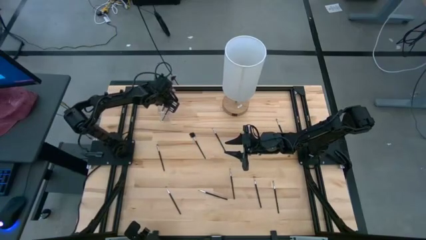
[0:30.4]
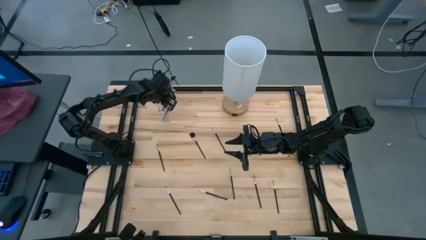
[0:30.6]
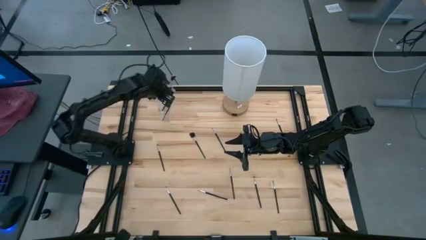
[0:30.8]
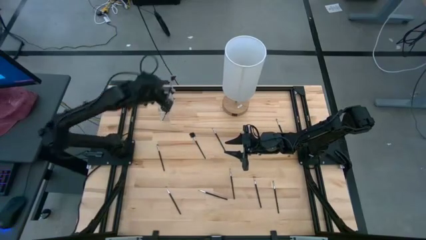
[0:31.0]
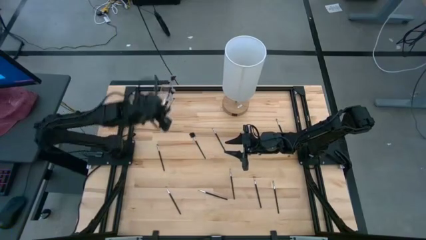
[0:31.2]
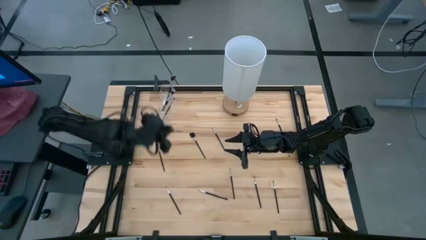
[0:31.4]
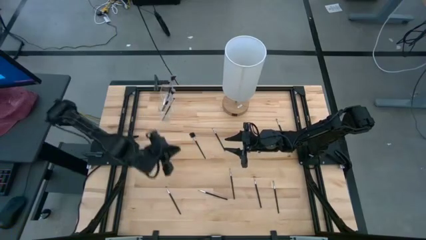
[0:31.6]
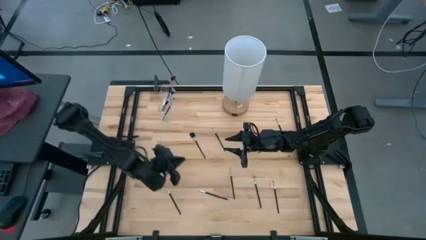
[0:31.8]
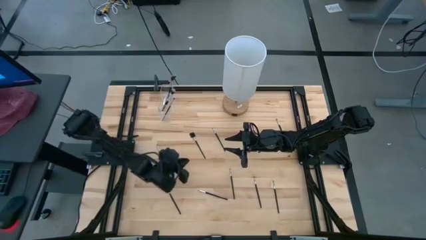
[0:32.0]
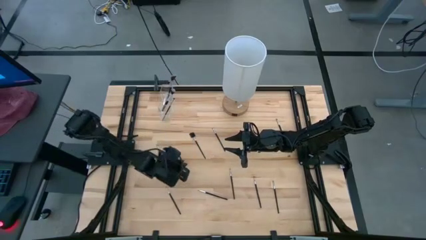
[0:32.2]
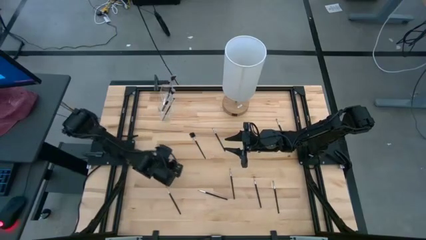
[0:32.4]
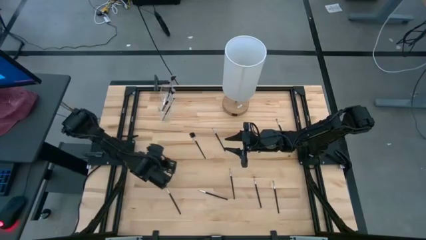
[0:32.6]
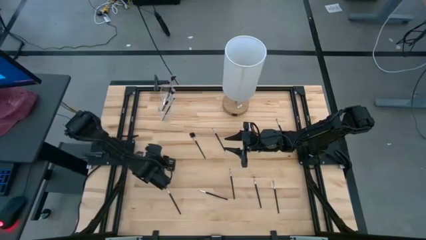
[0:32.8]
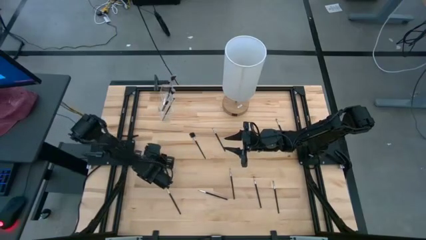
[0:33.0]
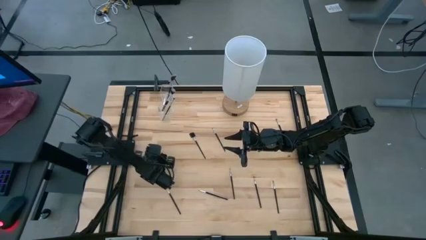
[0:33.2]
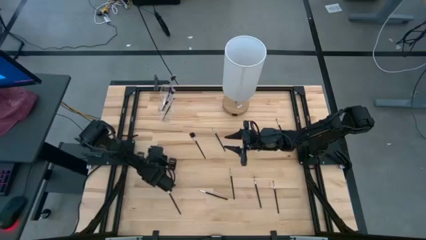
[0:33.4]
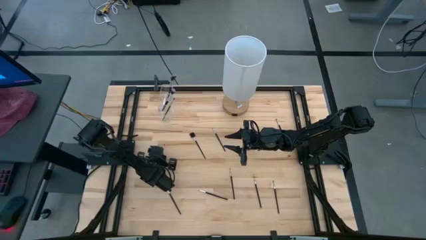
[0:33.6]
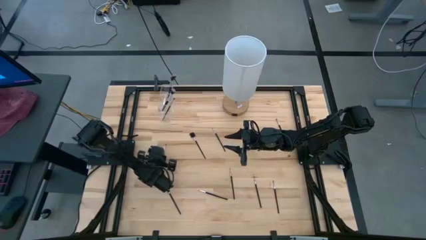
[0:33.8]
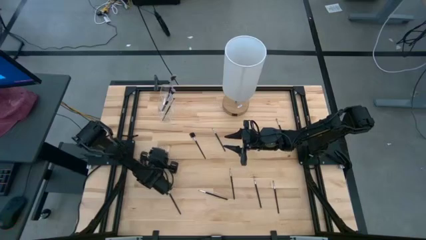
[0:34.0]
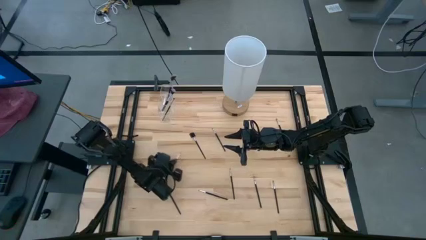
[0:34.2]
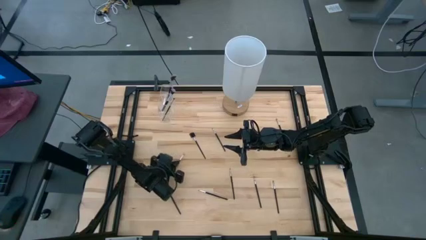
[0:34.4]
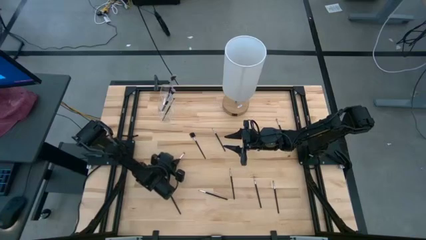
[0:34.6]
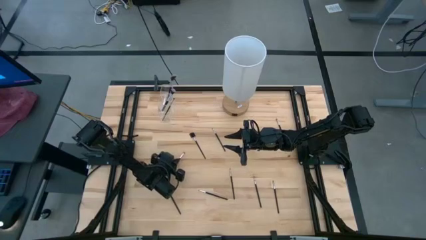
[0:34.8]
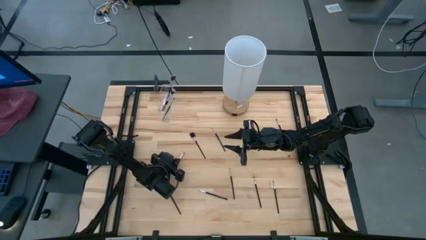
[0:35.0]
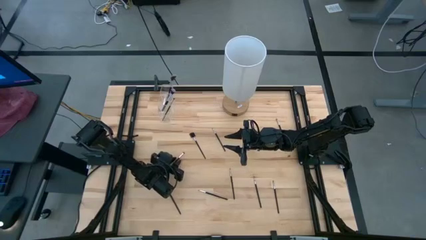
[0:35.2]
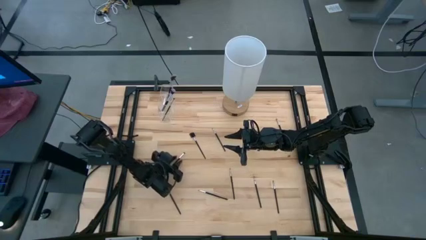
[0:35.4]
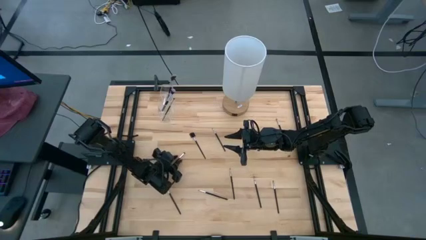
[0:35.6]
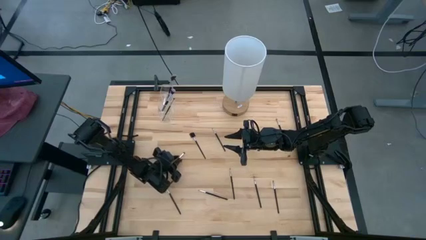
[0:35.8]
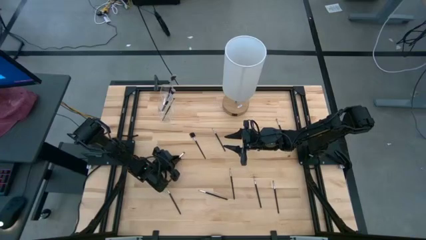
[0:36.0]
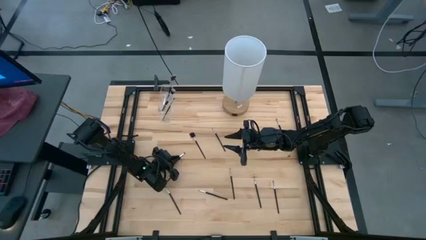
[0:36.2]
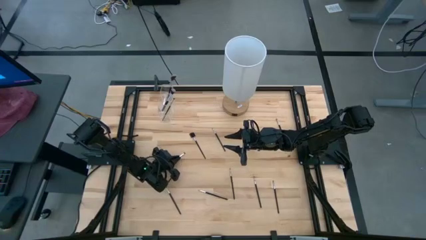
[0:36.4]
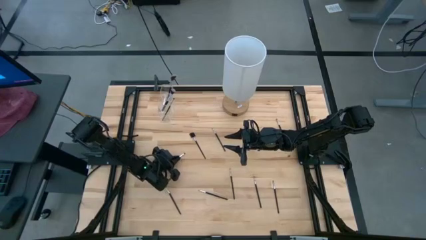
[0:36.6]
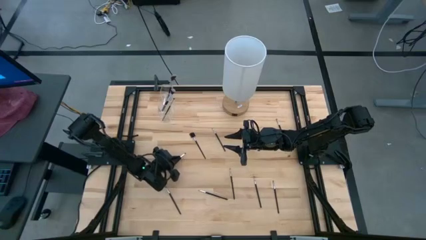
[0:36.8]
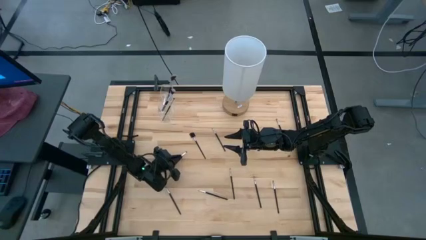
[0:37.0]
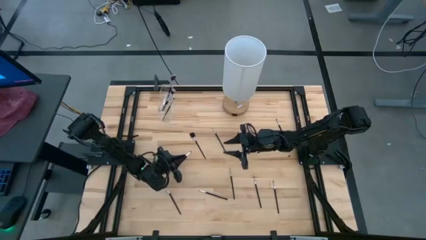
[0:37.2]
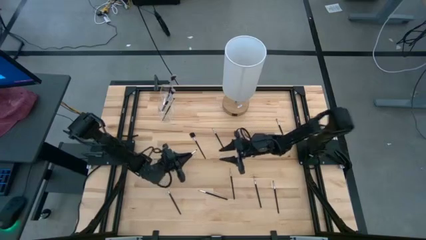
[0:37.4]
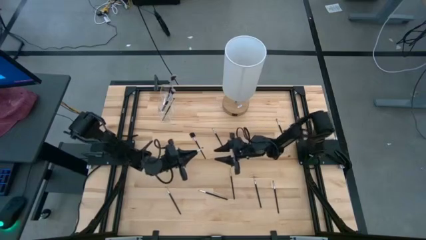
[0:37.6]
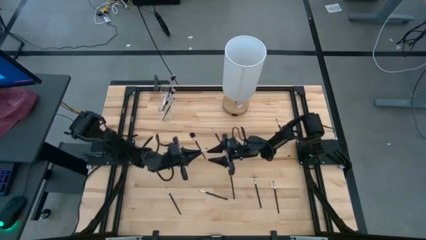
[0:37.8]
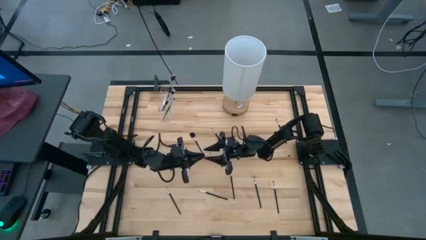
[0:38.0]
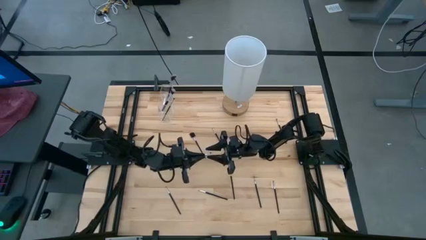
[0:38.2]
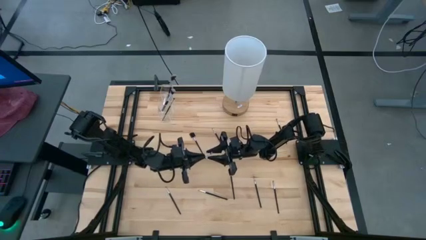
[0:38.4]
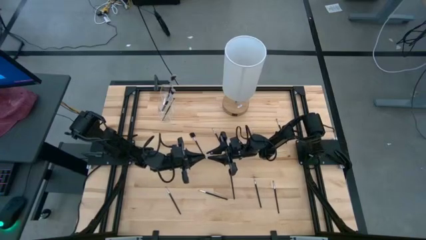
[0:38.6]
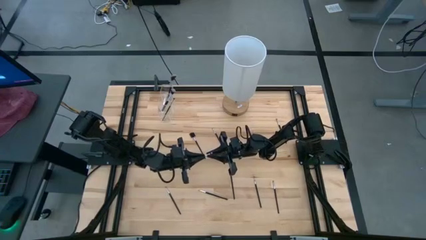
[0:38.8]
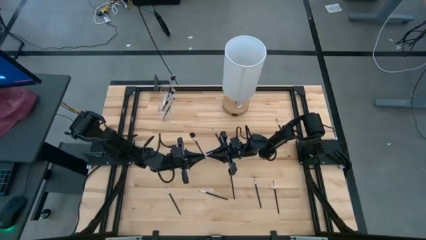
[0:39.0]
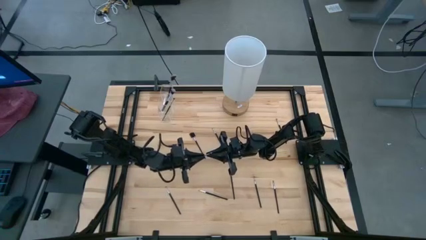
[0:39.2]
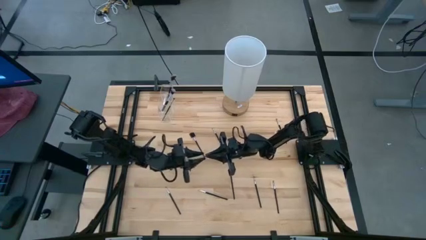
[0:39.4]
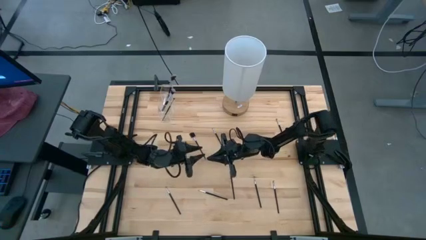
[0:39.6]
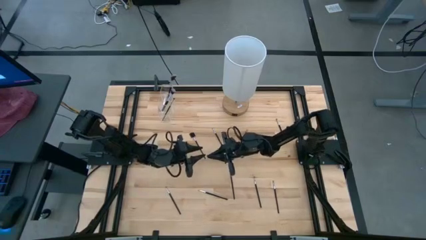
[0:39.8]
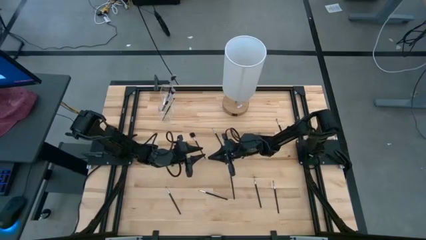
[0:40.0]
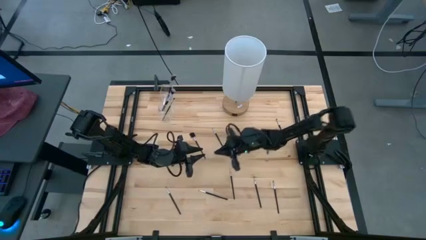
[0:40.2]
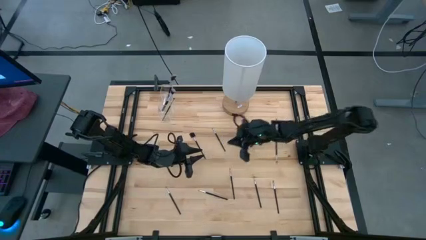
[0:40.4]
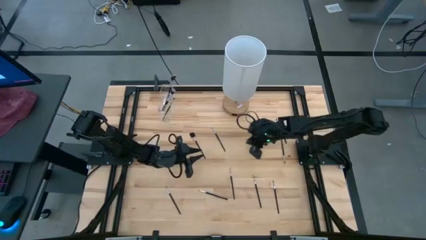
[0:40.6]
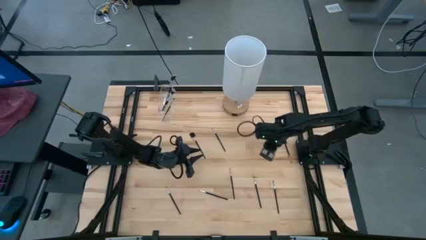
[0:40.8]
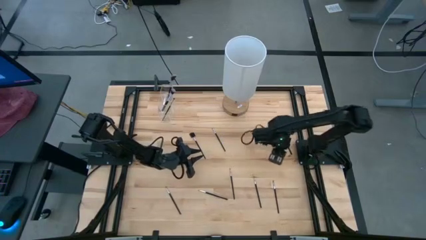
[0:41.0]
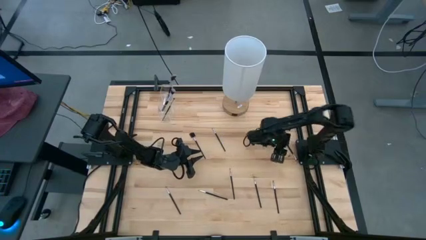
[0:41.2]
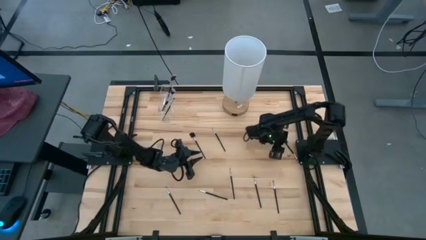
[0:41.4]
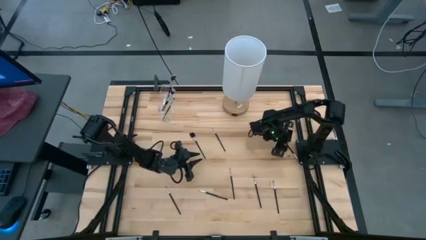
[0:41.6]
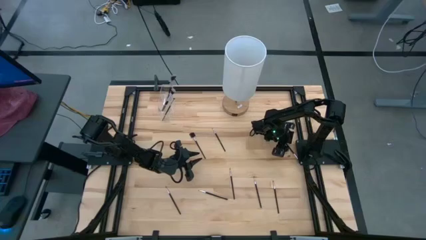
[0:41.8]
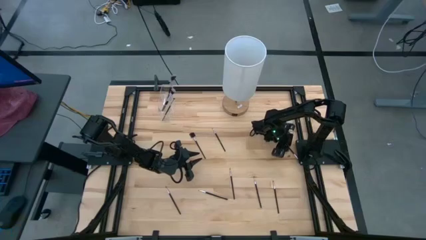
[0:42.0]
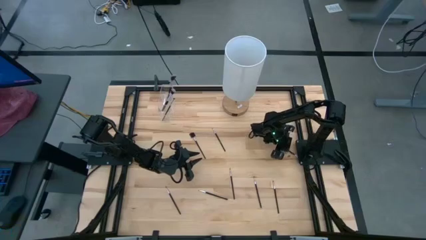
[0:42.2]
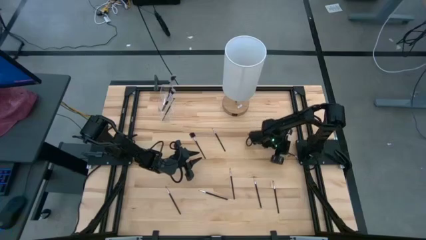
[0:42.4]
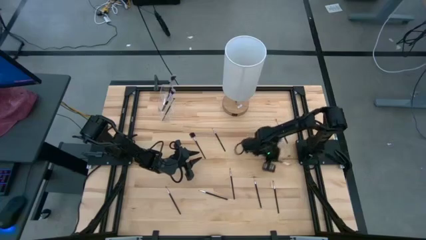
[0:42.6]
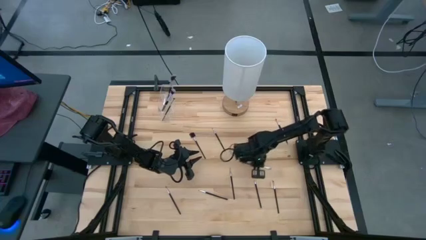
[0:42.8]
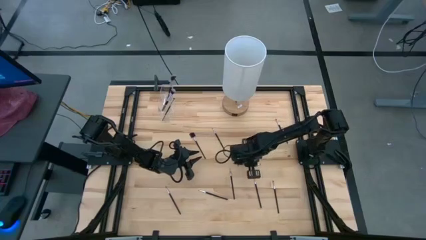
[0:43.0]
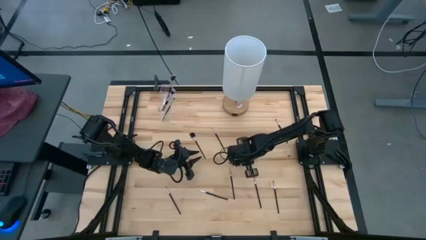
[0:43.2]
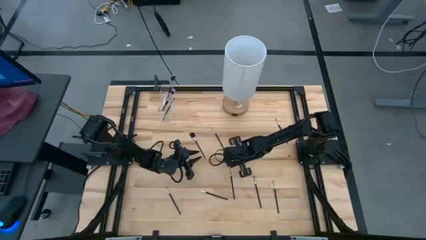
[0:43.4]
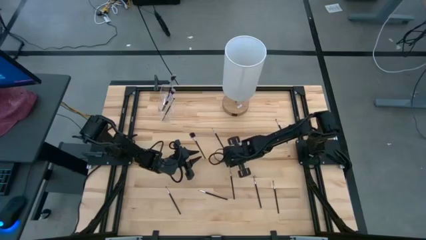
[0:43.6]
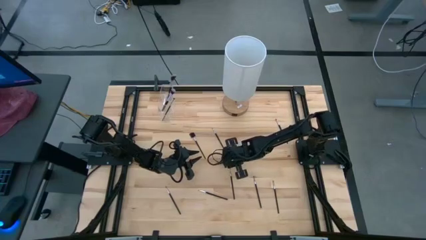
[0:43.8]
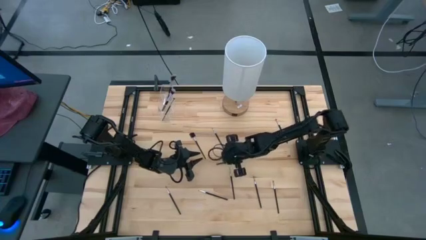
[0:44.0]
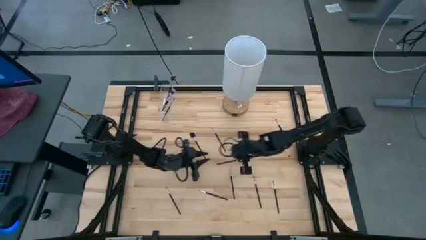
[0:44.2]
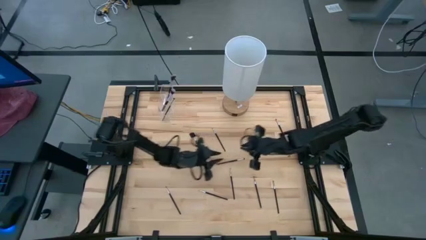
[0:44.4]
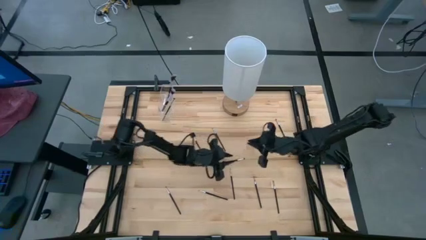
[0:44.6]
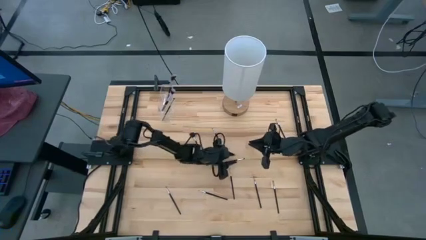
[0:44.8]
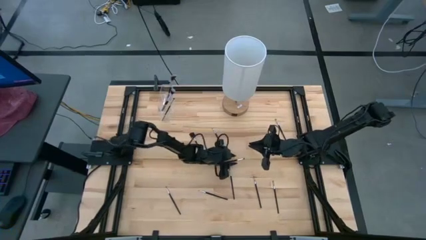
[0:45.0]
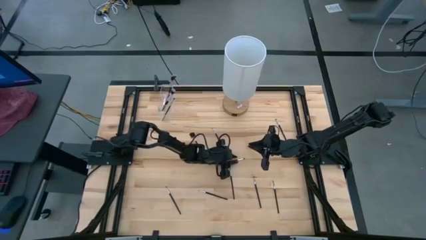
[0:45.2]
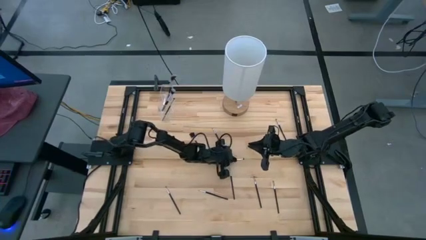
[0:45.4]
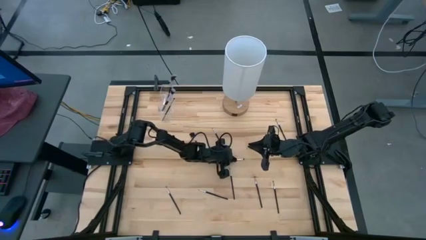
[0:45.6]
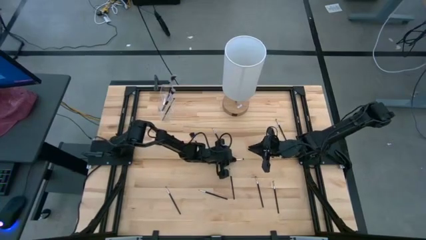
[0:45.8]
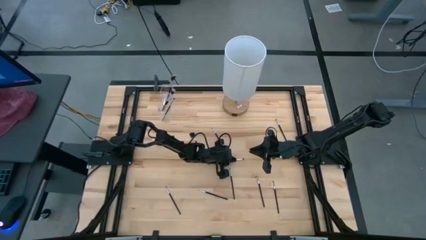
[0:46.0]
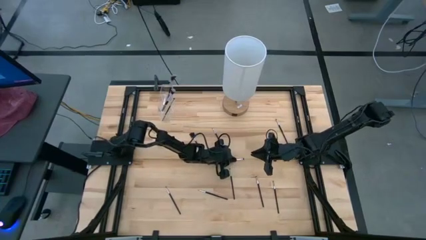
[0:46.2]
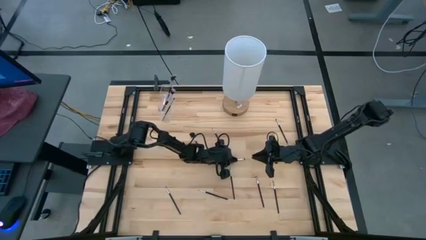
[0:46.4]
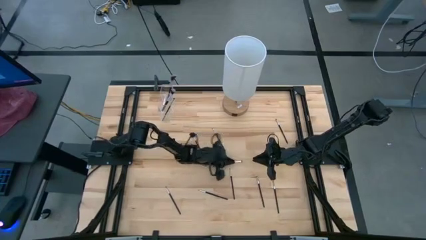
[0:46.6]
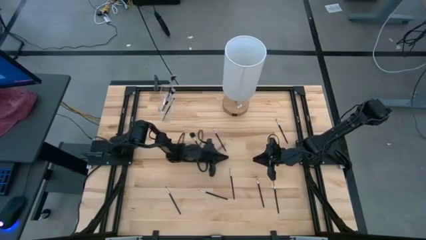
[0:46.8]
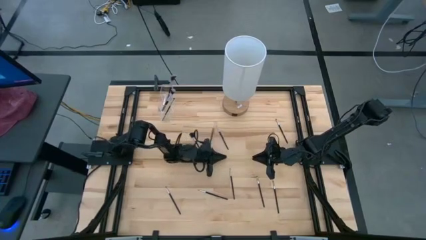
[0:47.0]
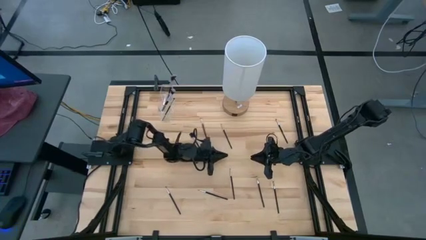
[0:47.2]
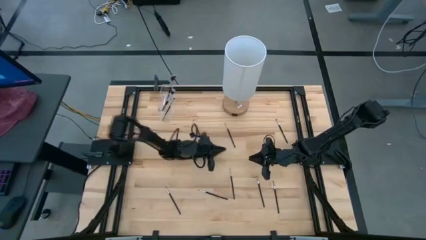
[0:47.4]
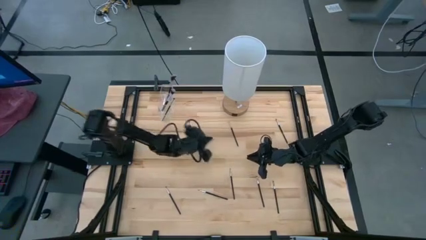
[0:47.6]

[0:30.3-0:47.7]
Task: Put items in baskets/containers
Put the black eyeshadow brush into the transparent organizer
